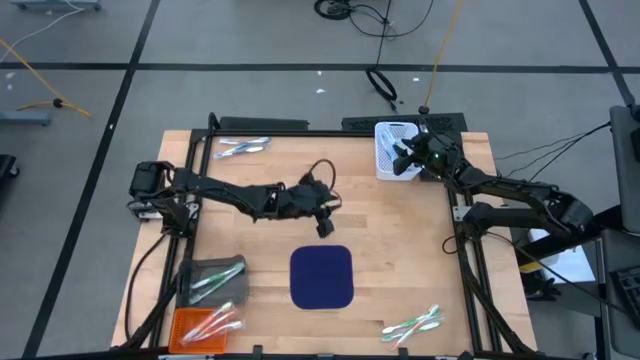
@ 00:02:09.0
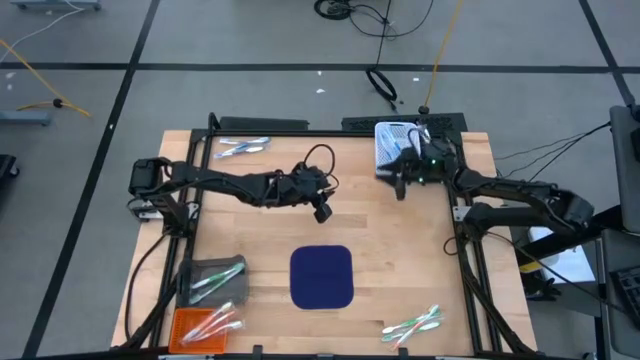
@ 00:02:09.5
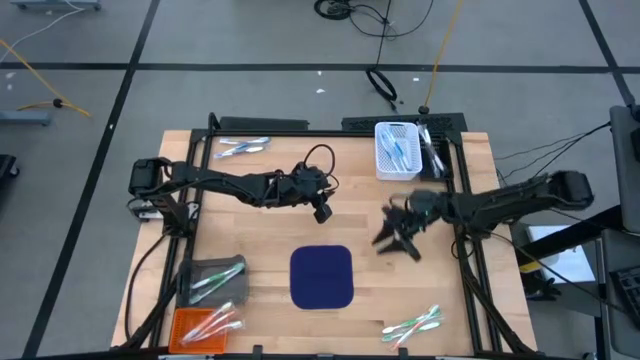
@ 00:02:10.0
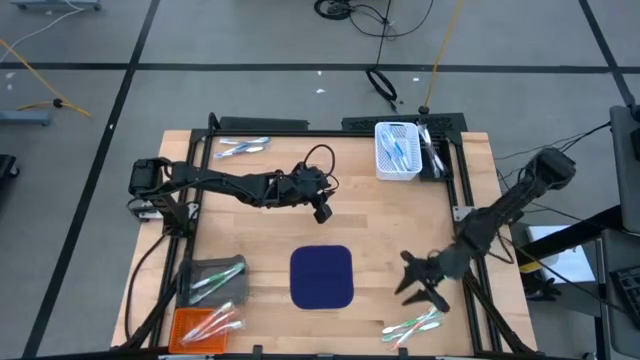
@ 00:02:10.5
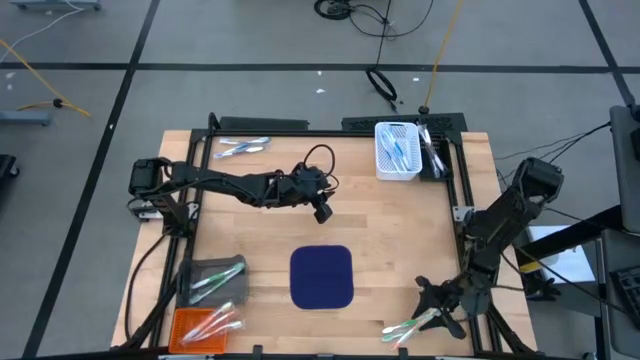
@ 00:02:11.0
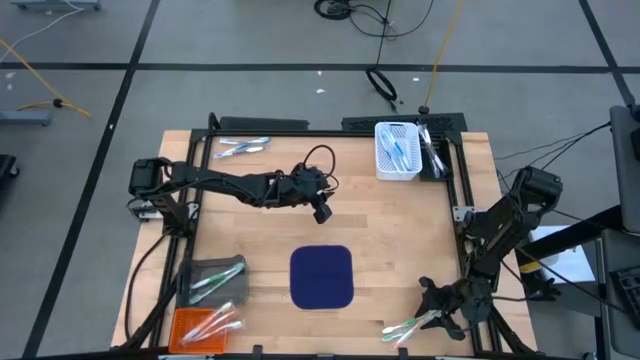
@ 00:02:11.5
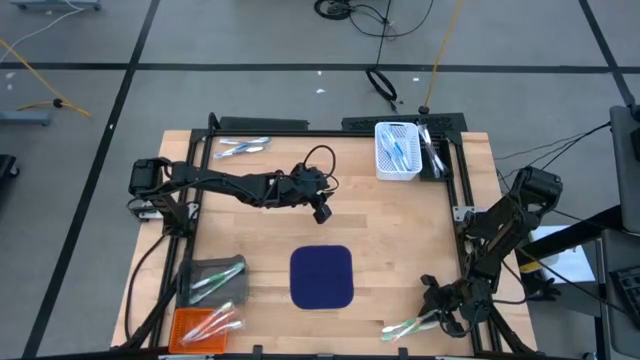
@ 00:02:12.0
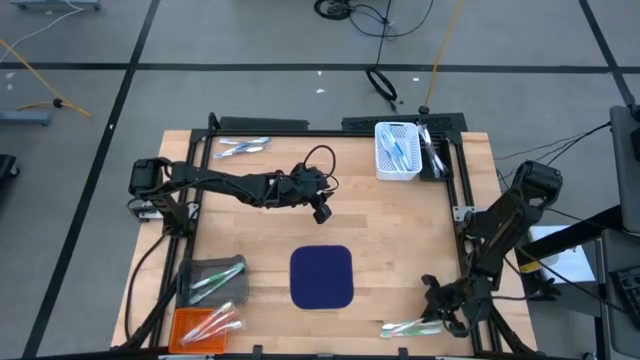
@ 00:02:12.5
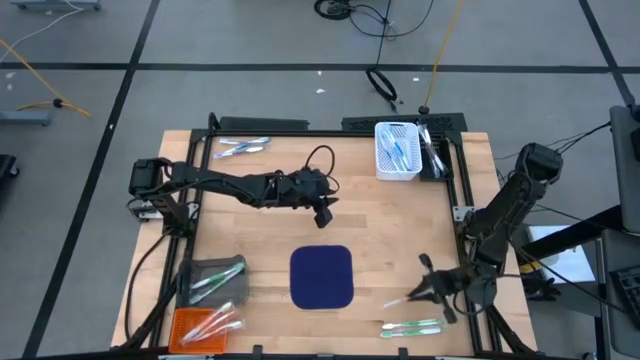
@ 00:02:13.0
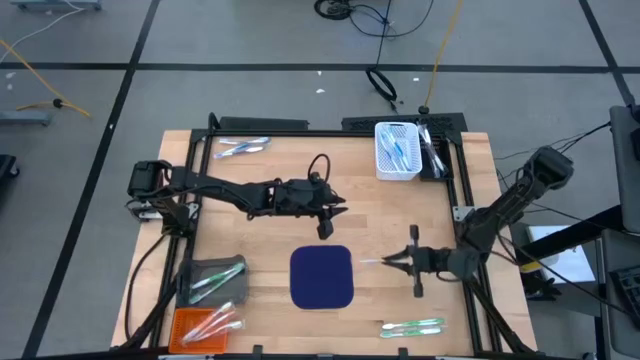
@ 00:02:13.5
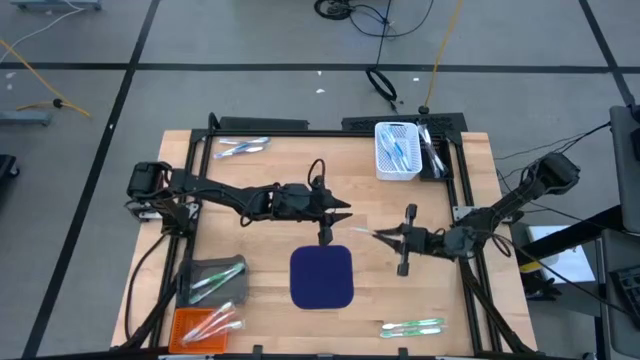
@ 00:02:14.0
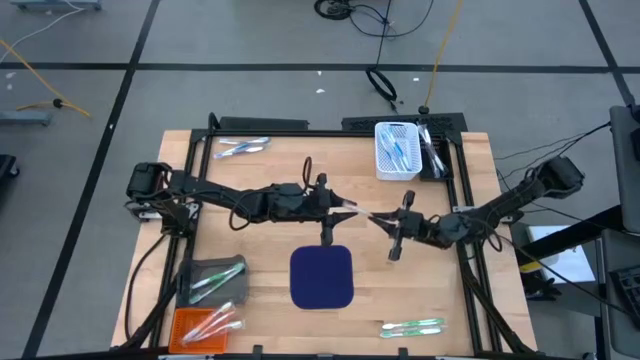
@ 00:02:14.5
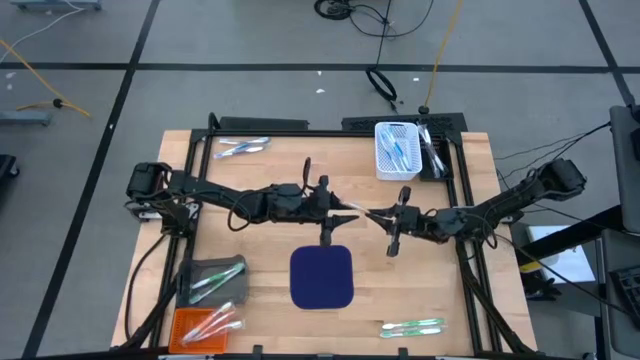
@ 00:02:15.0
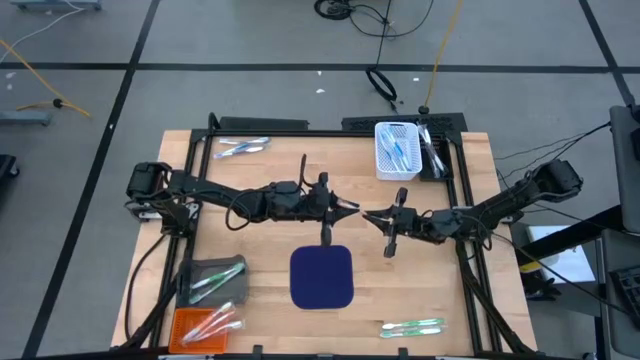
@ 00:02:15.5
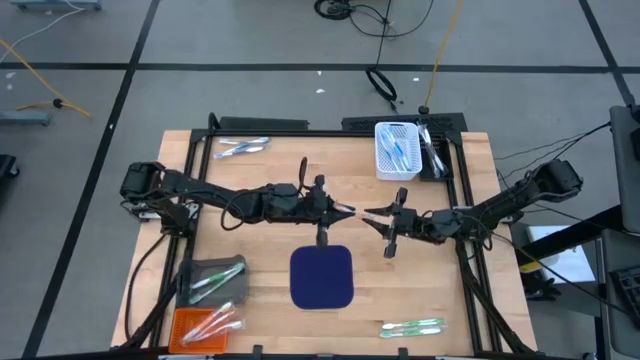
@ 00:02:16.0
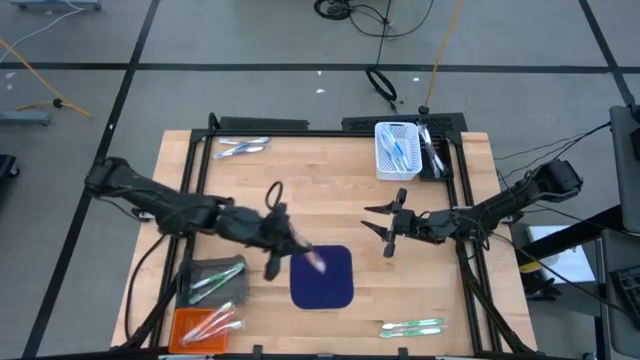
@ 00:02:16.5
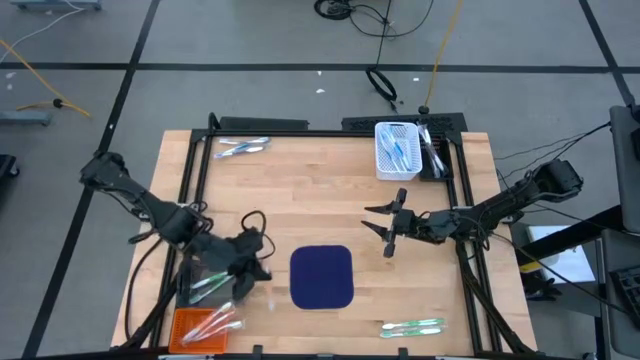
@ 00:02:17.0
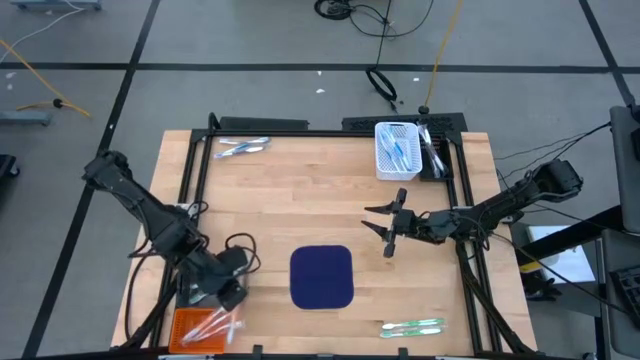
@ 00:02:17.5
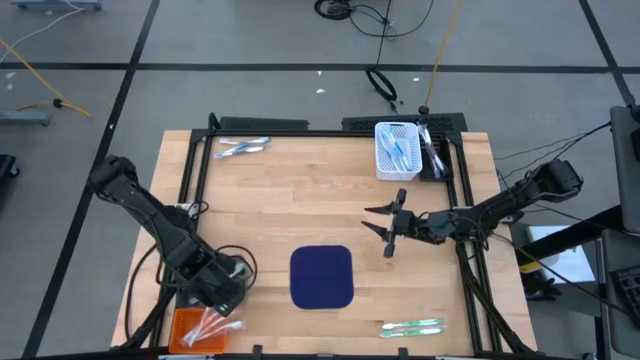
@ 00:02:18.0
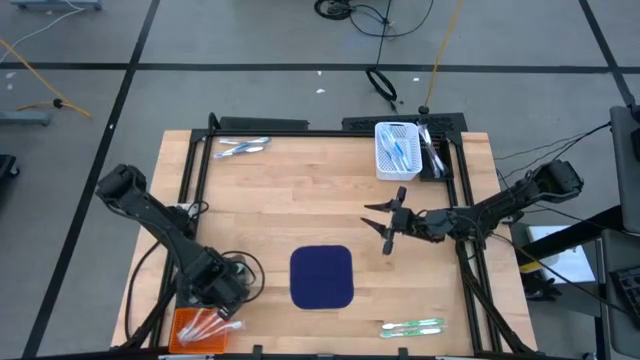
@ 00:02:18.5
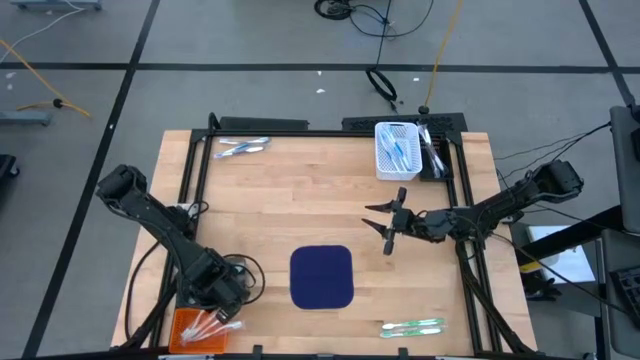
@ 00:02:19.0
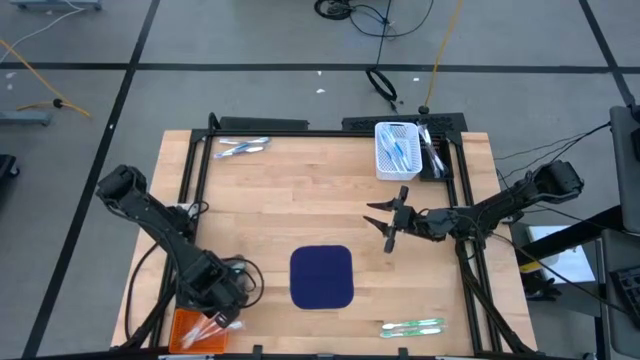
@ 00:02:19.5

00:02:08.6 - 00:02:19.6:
Task: Pick & Place Toothbrushes
Put the orange toothbrush into the orange basket

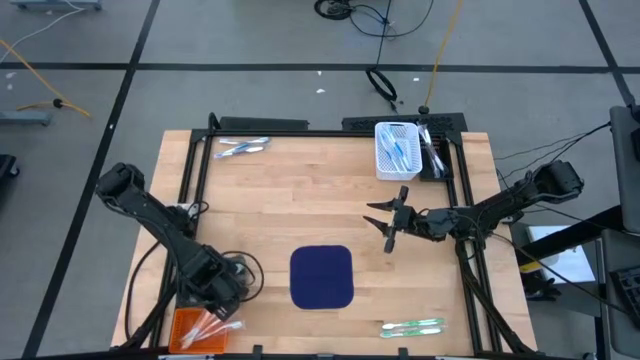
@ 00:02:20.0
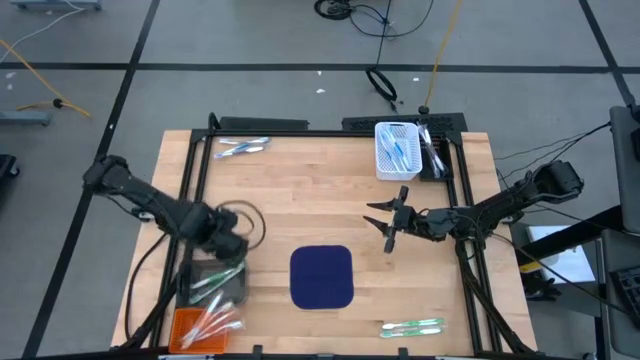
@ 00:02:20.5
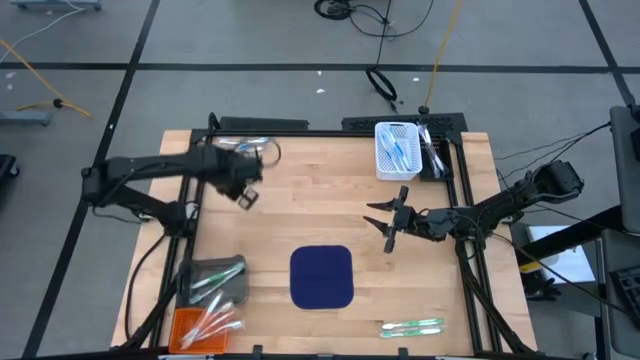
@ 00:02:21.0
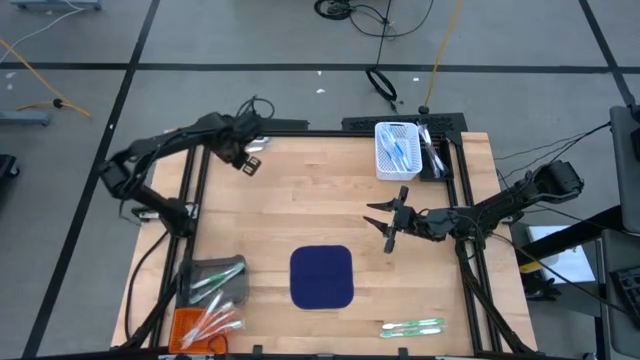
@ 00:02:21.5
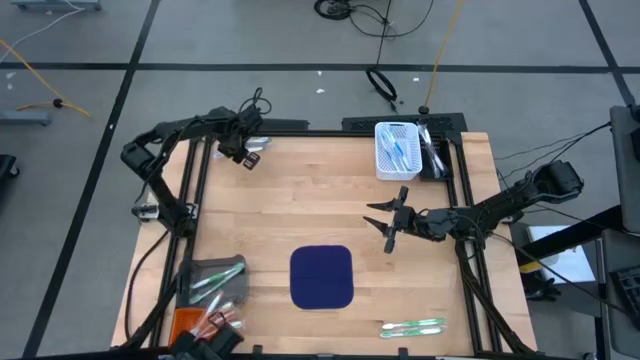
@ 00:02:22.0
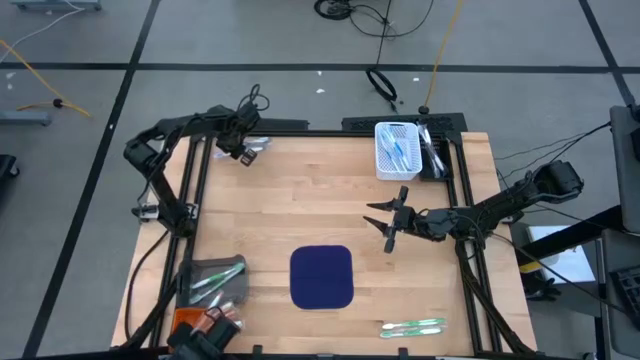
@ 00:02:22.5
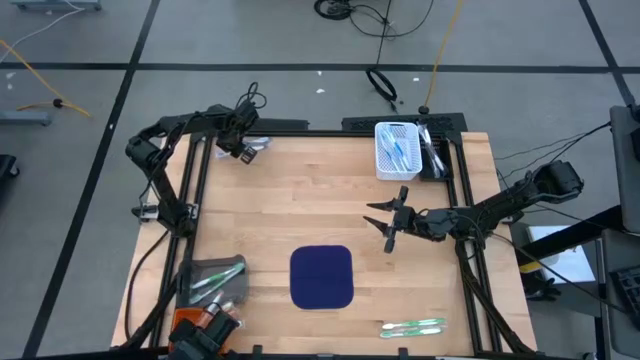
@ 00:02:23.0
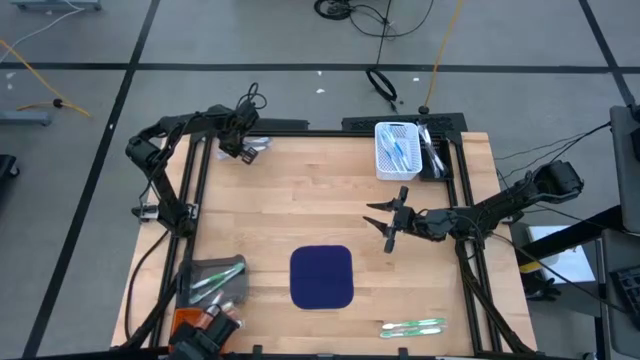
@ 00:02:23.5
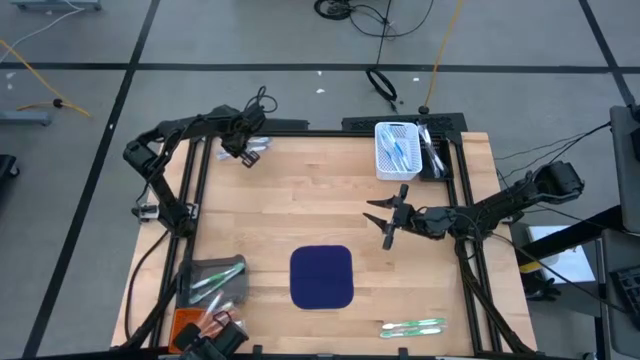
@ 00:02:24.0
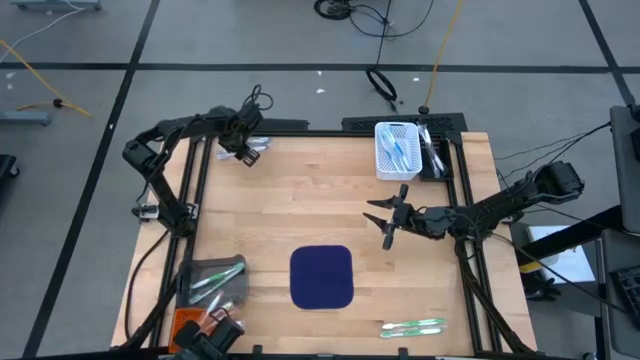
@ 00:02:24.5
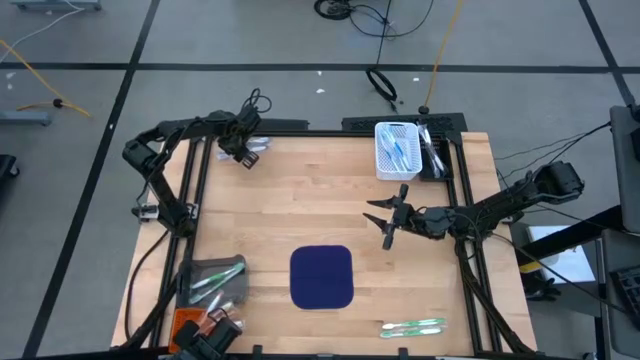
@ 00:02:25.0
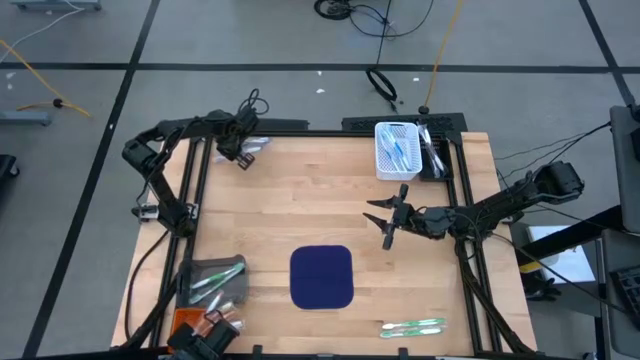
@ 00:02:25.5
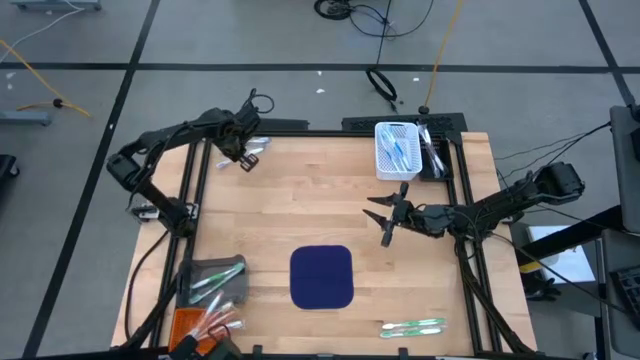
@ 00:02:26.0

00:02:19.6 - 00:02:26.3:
Put the violet toothbrush into the black basket

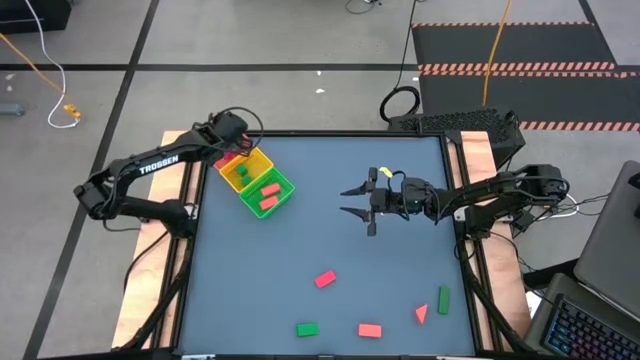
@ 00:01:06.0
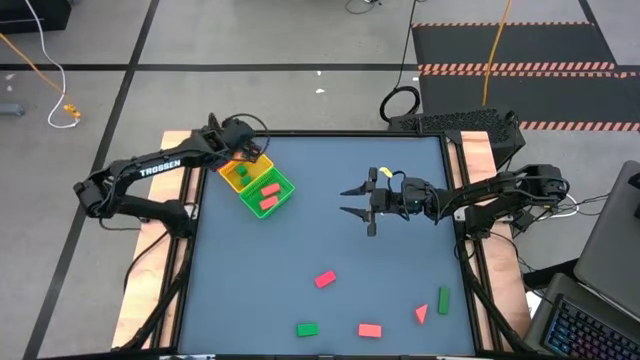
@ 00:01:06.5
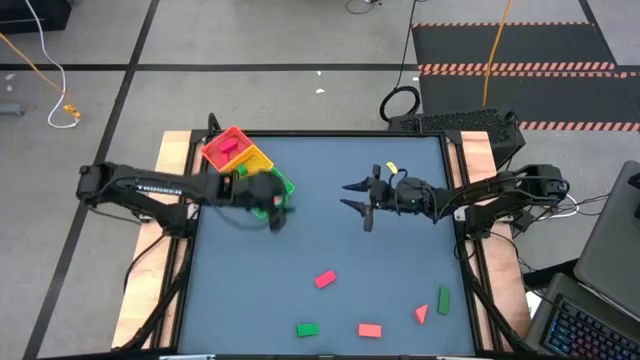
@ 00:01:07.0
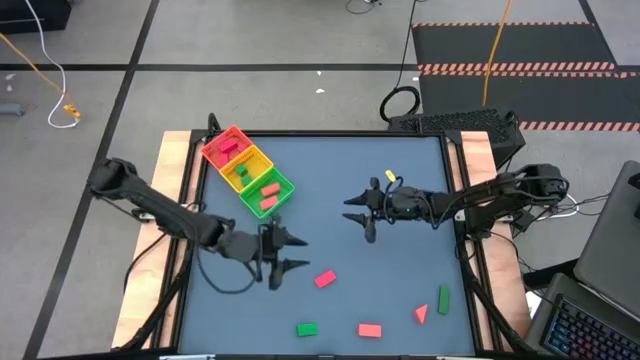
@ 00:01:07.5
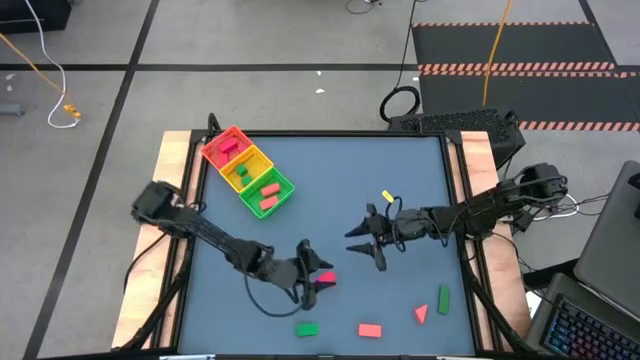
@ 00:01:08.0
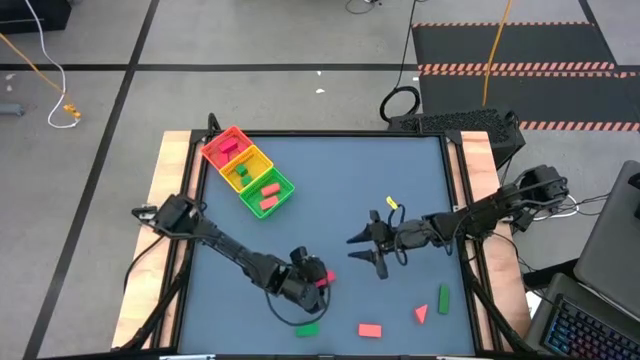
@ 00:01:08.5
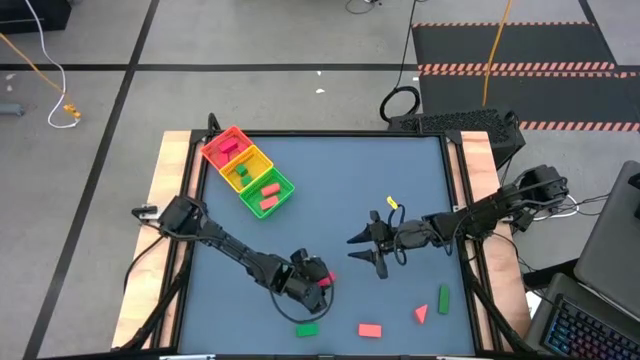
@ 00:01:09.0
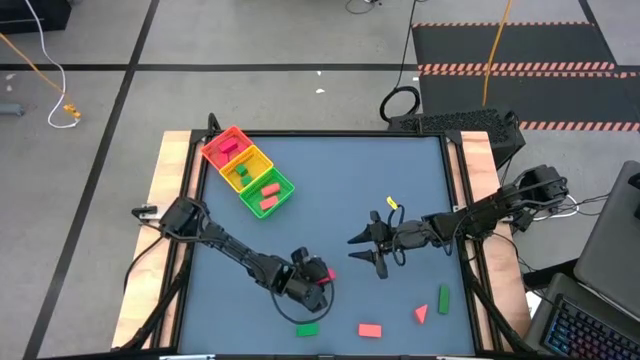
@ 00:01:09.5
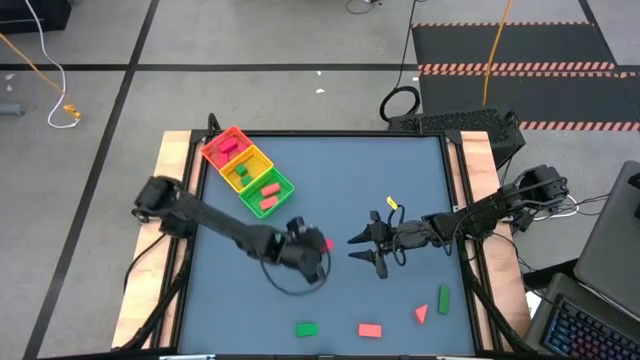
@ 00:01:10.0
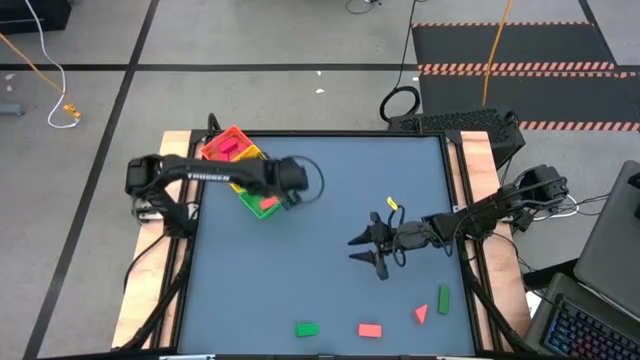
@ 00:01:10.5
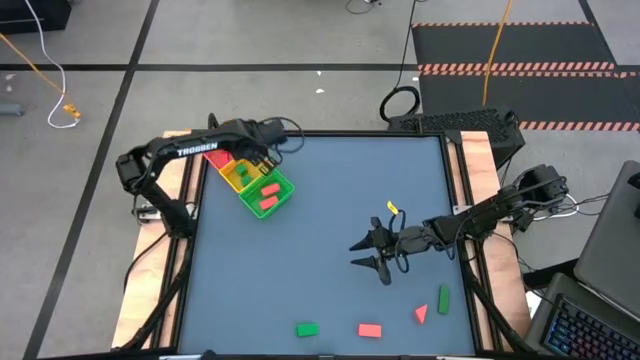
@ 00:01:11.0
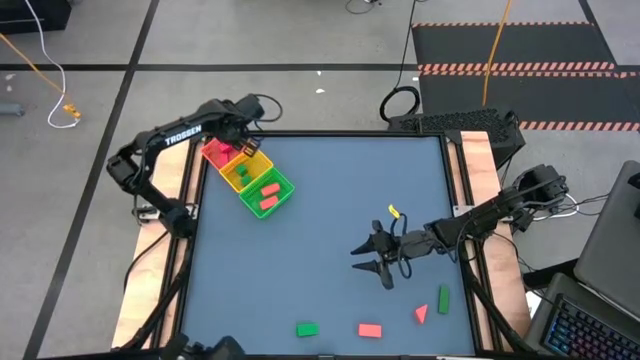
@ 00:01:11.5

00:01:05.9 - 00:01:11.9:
Task: Sort & place blocks by color
Put the red block into the orange basket
